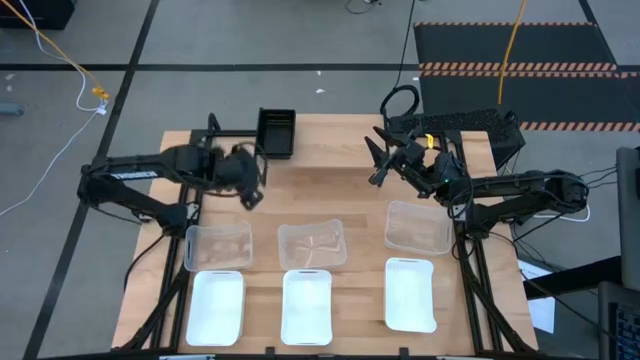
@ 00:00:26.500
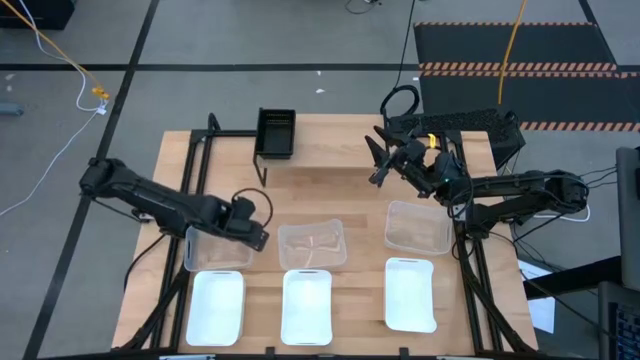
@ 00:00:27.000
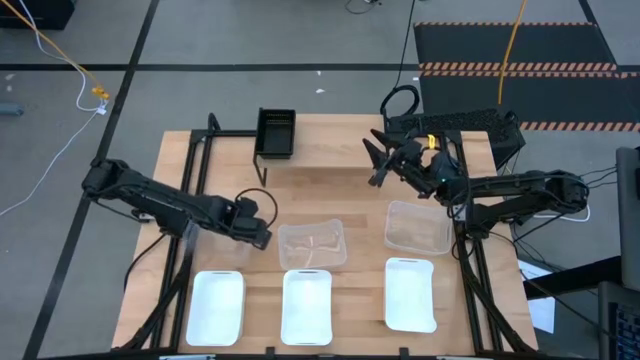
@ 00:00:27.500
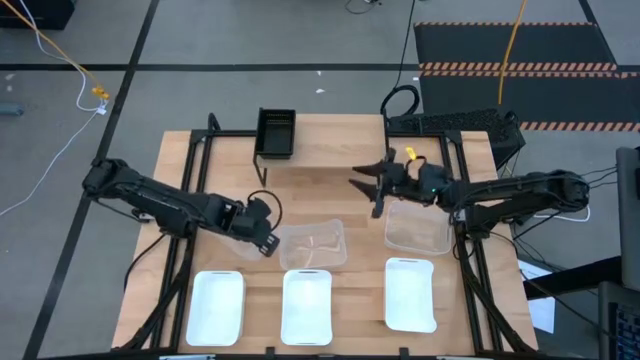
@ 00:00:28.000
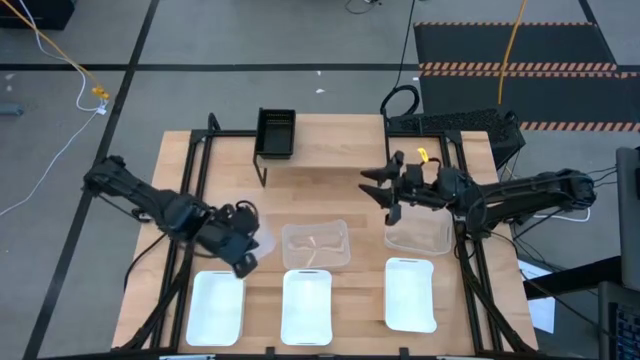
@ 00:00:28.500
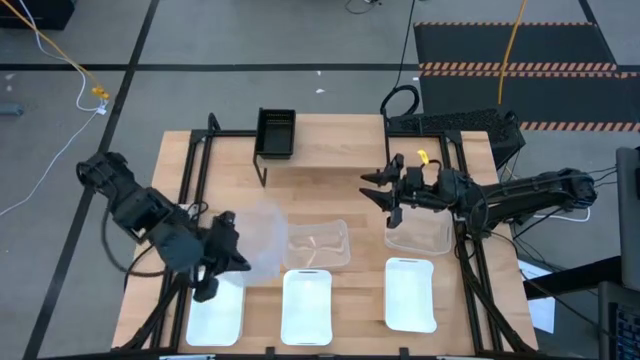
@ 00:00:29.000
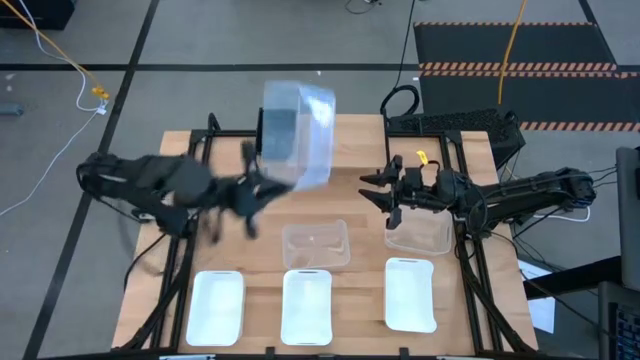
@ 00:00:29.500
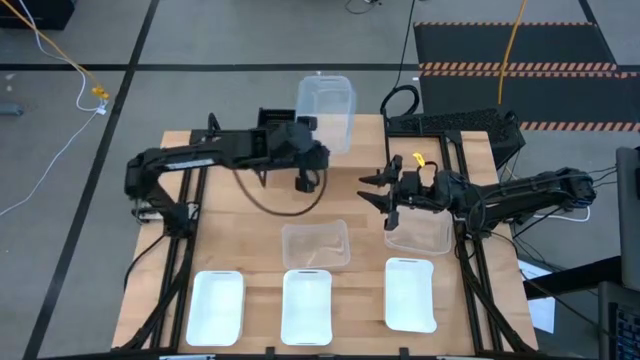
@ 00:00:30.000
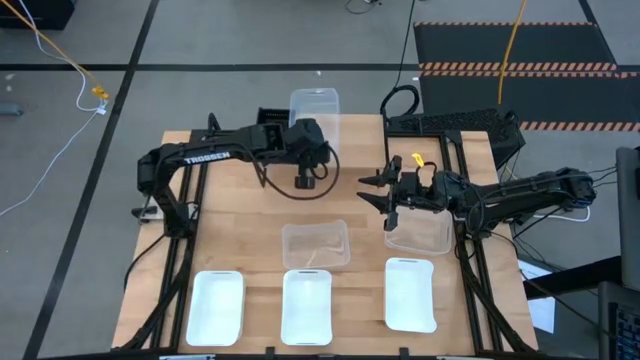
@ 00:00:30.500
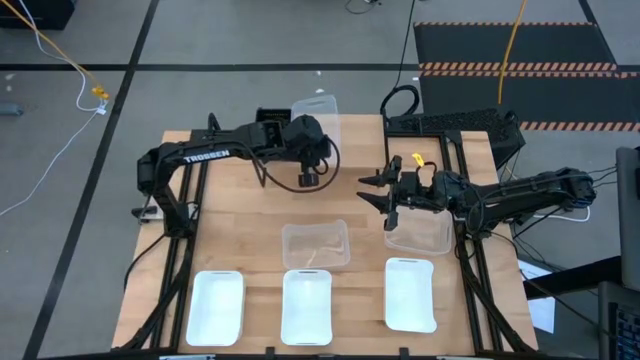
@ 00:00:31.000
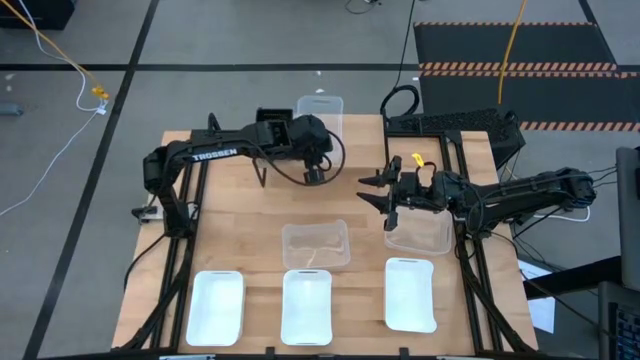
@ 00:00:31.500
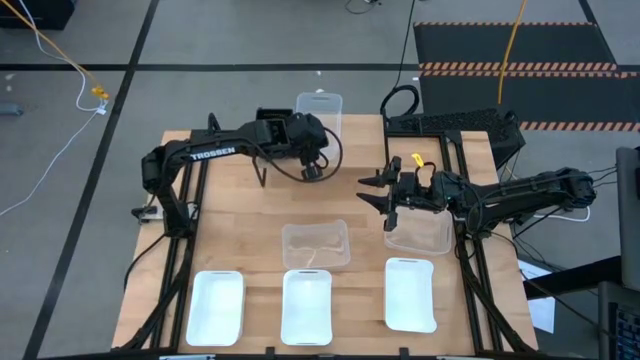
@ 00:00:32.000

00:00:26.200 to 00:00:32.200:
Task: Stack baskets on shelf by color
Put the left transparent bin on the shelf

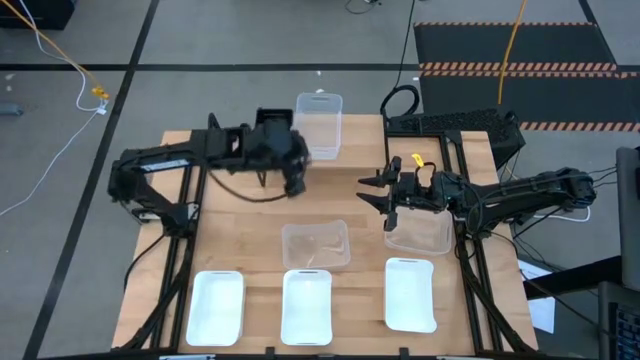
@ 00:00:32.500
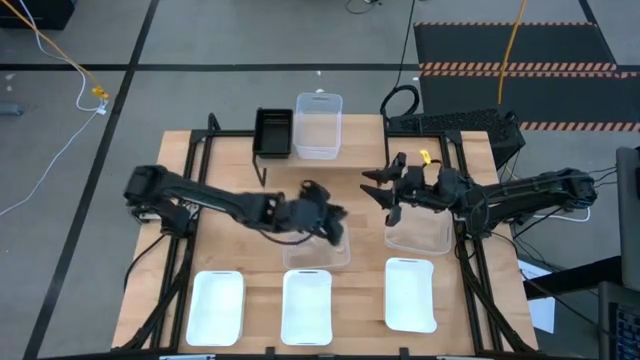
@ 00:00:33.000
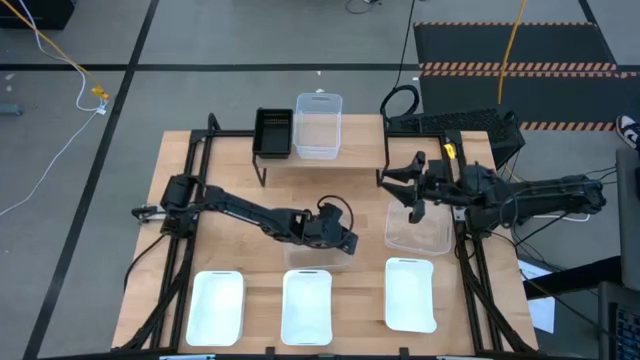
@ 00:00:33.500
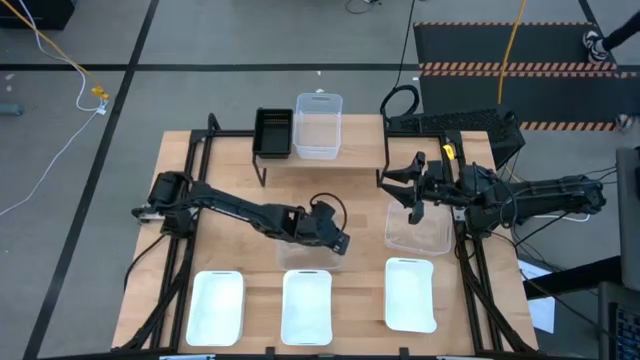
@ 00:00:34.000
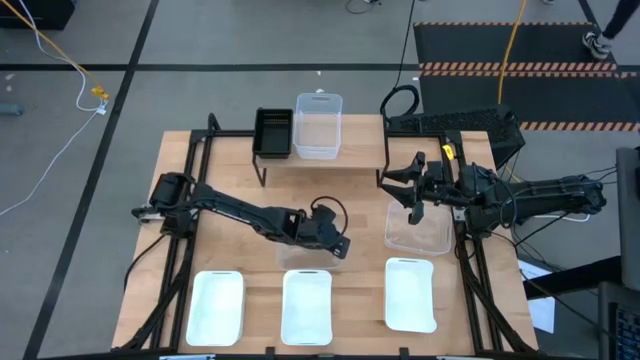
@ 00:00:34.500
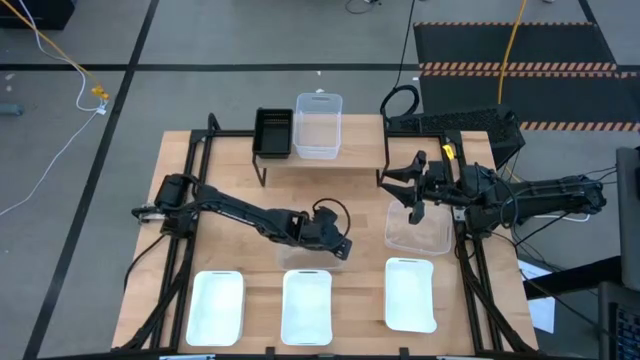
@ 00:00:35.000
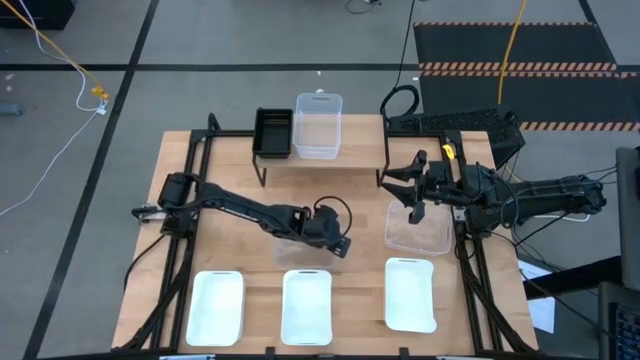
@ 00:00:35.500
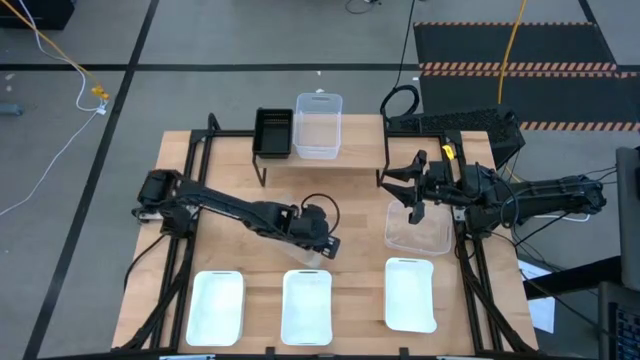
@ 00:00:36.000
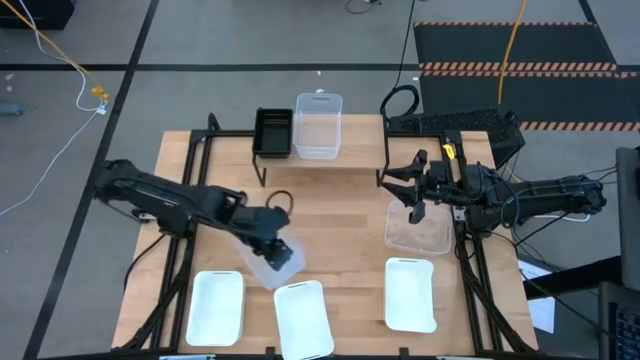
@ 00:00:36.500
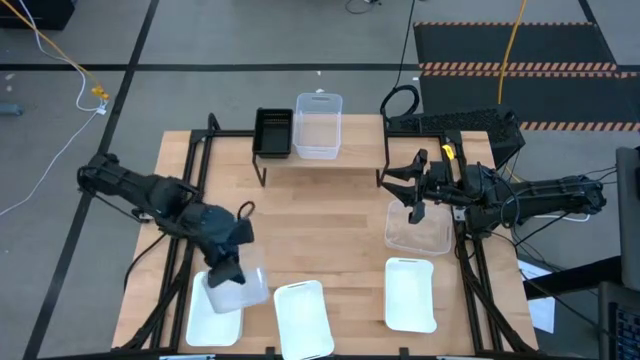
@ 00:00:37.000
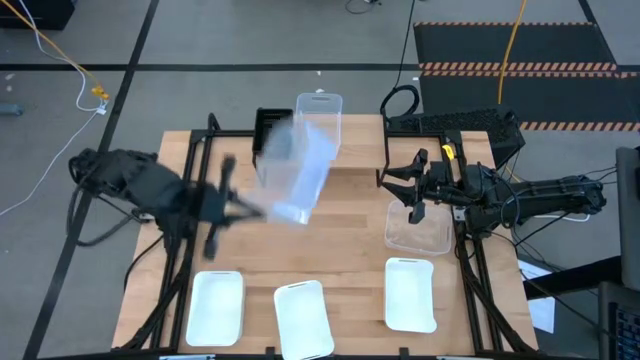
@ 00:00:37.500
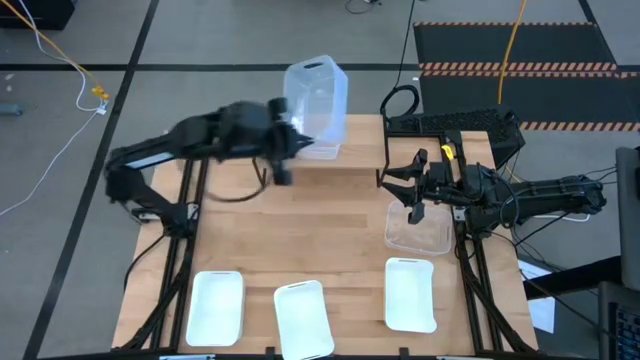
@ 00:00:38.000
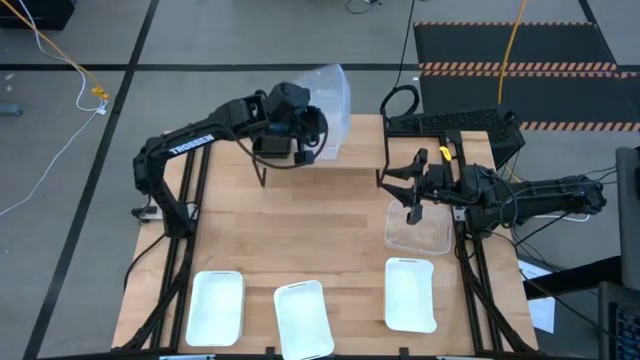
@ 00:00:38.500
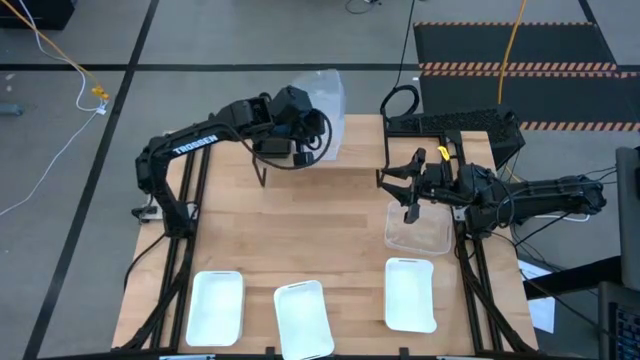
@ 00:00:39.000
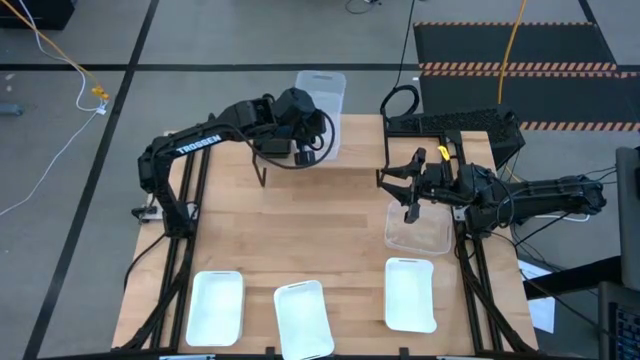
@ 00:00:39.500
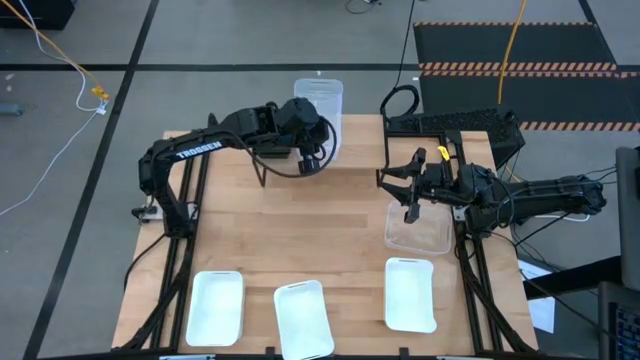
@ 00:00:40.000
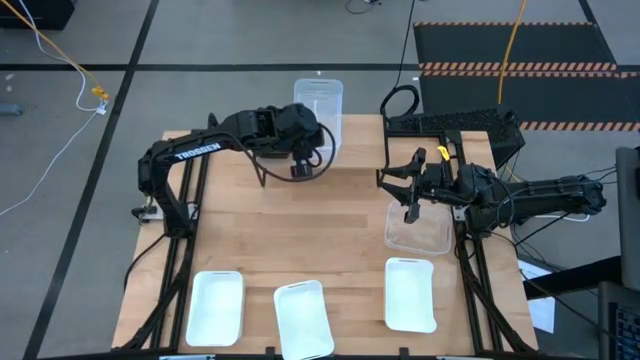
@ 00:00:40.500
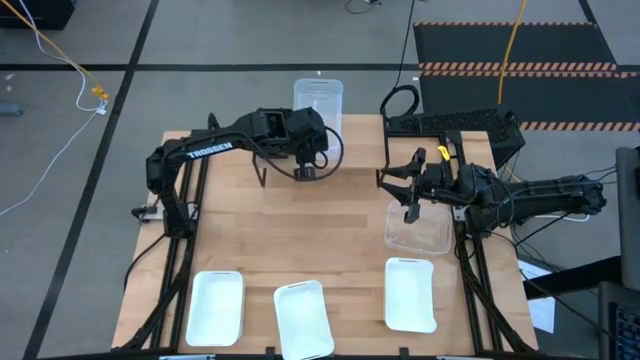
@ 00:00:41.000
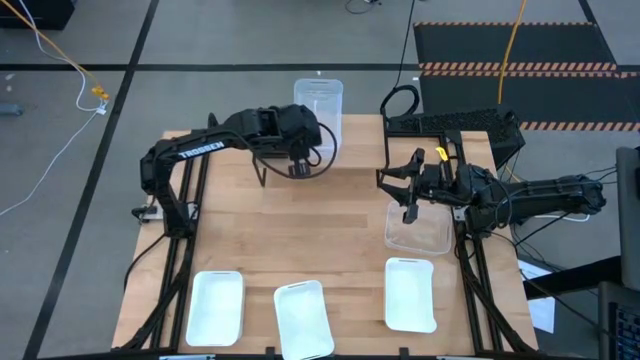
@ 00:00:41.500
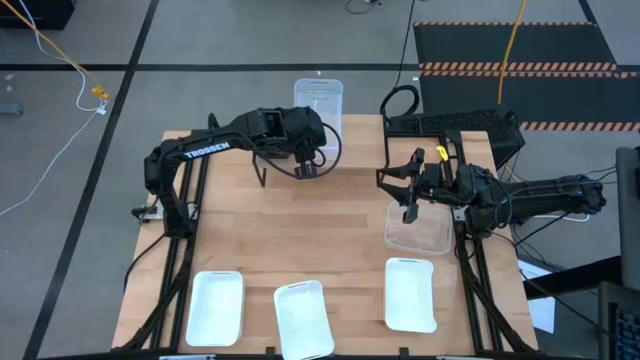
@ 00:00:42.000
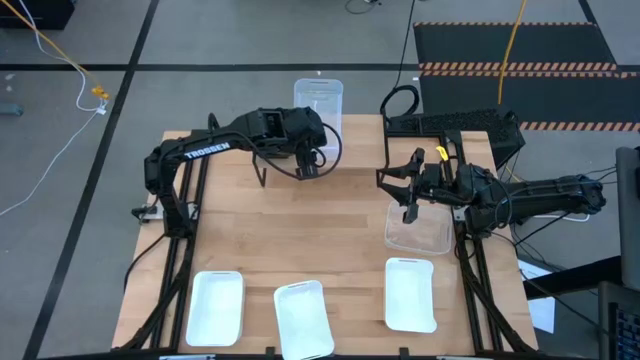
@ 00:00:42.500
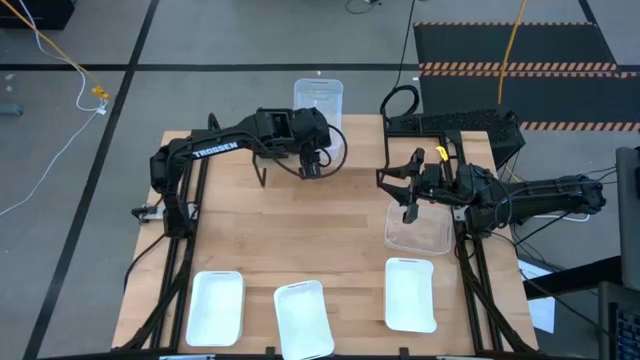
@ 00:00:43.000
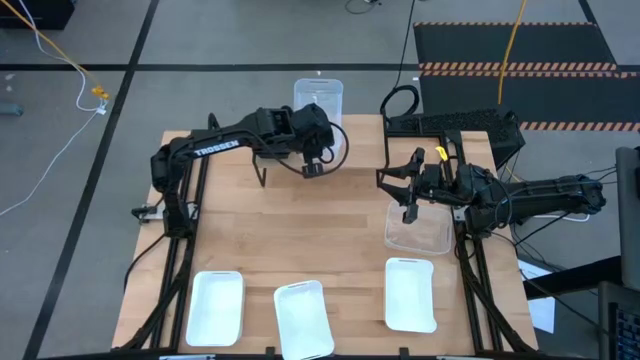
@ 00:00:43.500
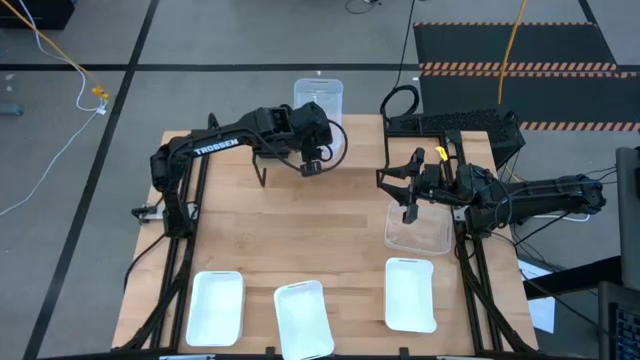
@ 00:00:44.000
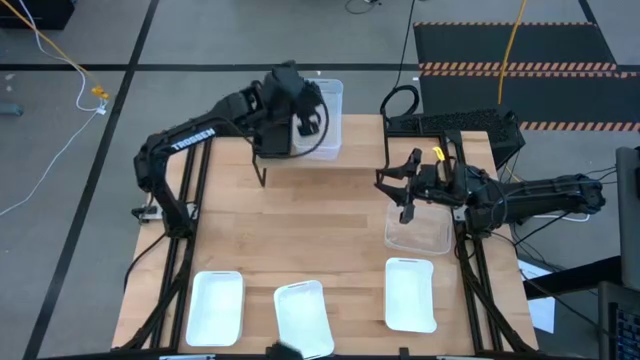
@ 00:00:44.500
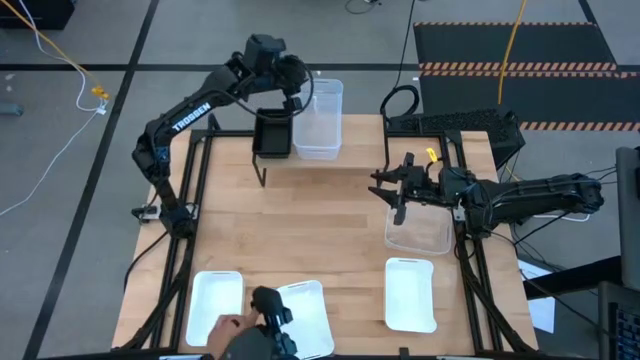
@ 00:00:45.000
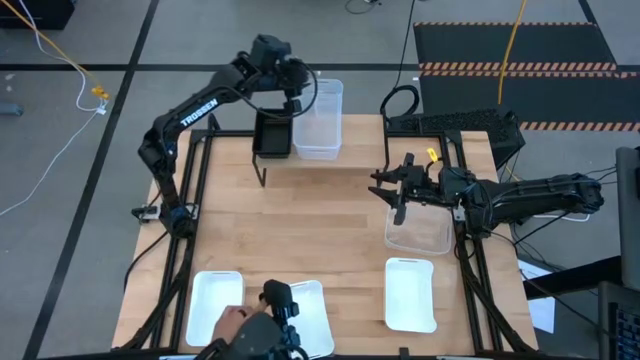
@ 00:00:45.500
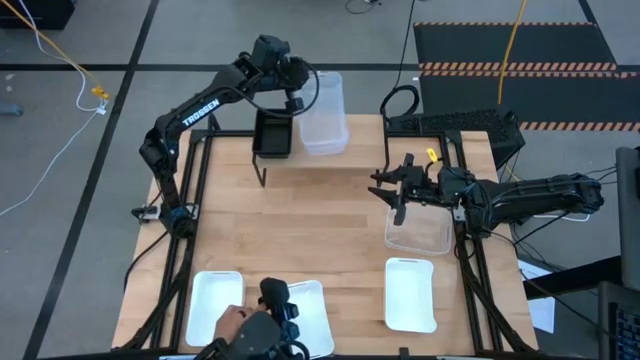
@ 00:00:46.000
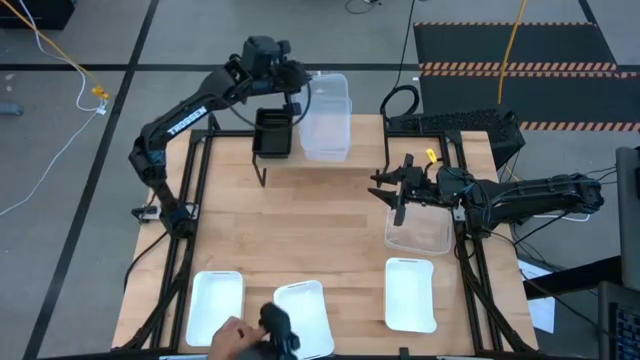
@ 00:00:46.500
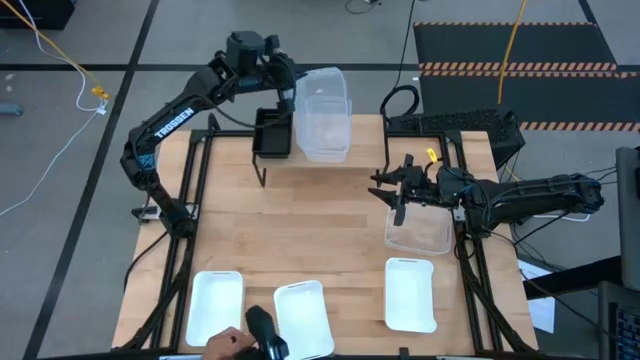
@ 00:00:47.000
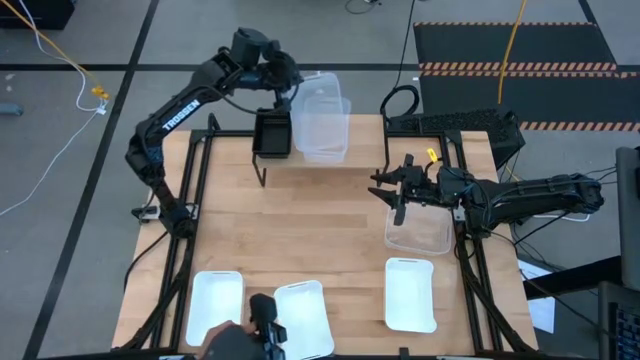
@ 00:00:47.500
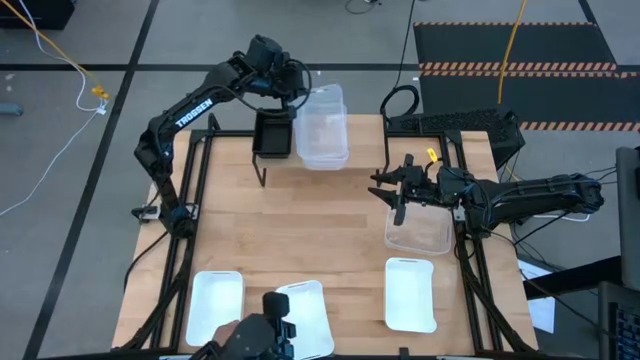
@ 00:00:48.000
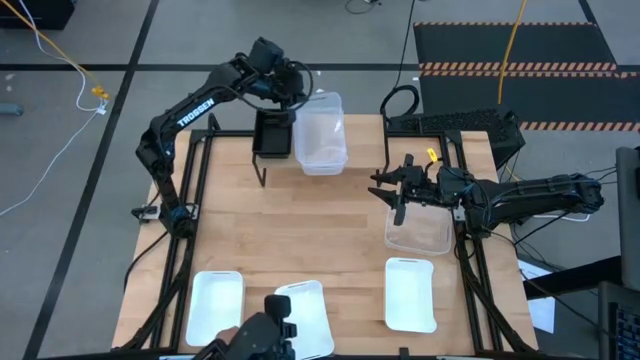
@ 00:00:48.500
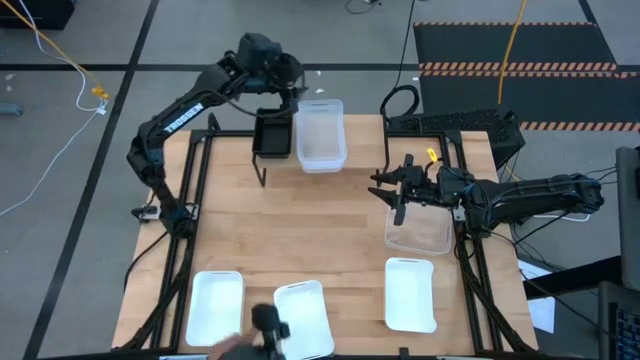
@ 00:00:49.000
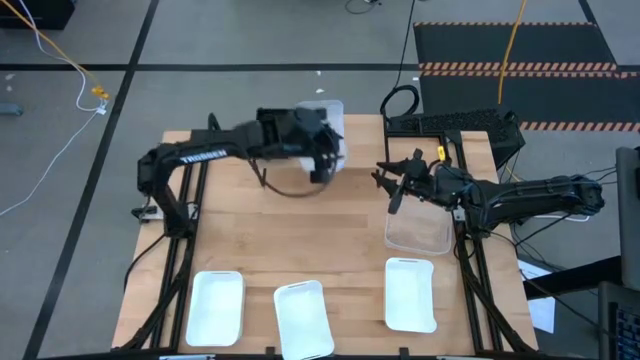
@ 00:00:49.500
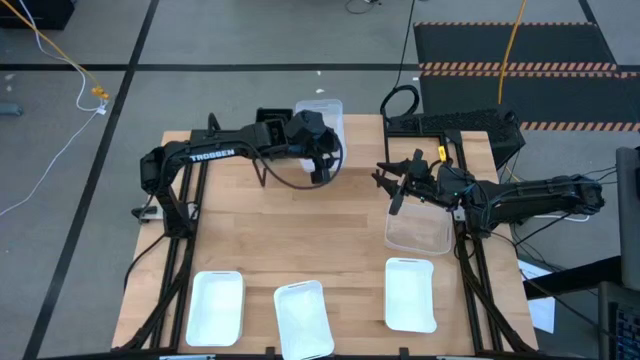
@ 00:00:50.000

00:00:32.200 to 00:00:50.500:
Stack the left transparent bin on top of the other transparent bin on the shelf
